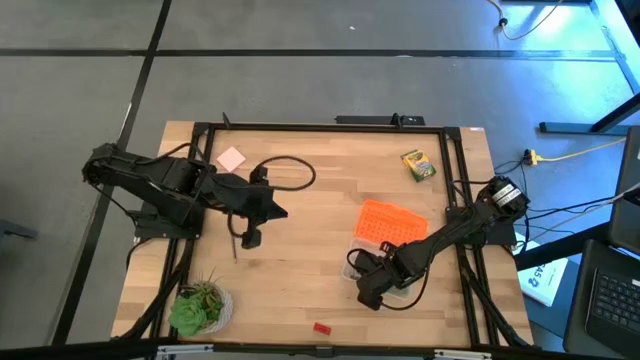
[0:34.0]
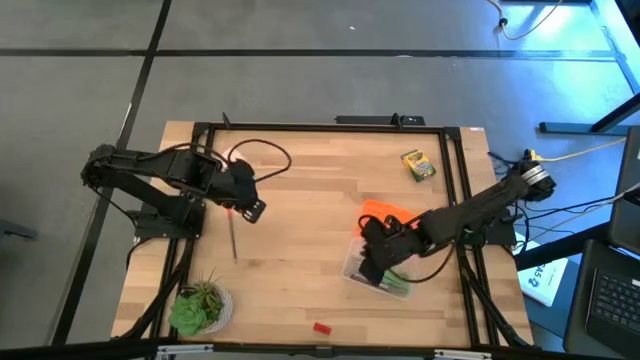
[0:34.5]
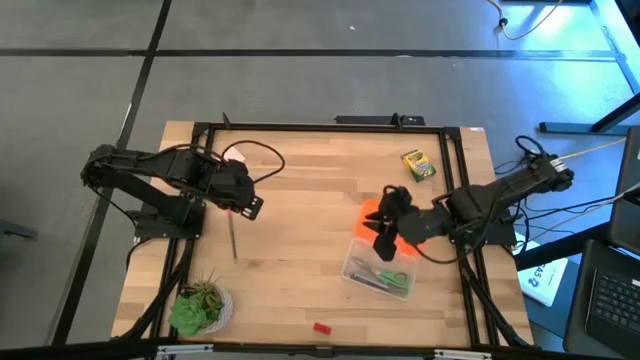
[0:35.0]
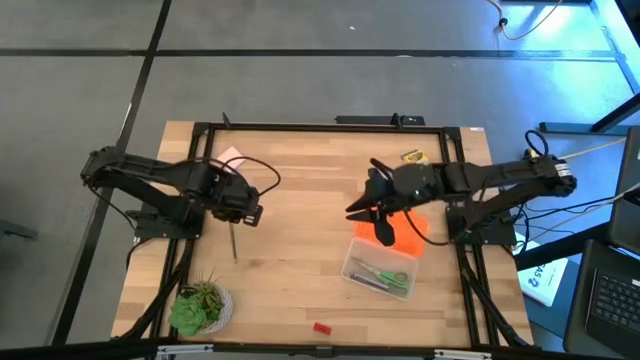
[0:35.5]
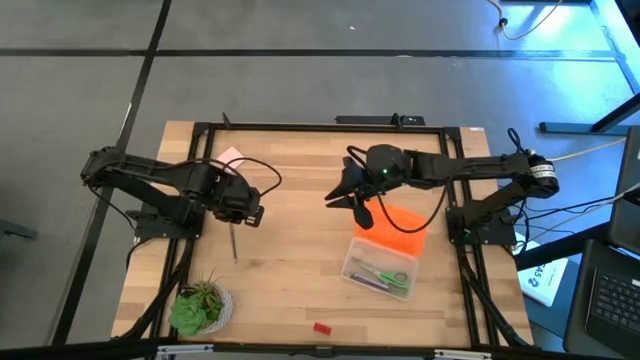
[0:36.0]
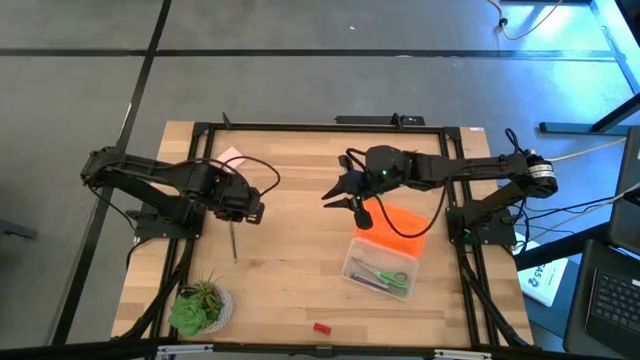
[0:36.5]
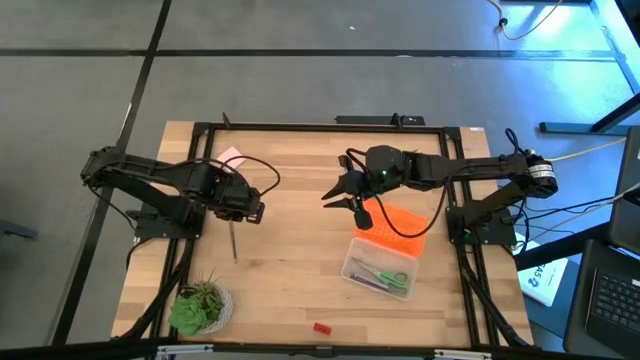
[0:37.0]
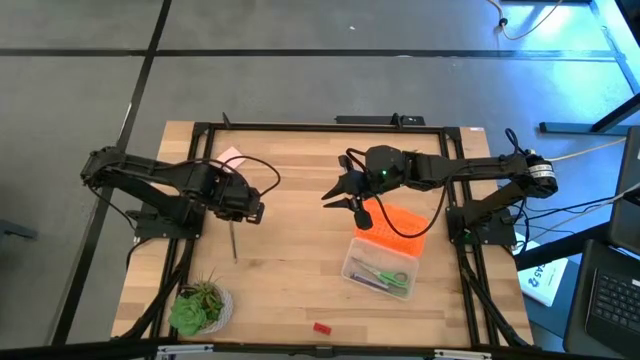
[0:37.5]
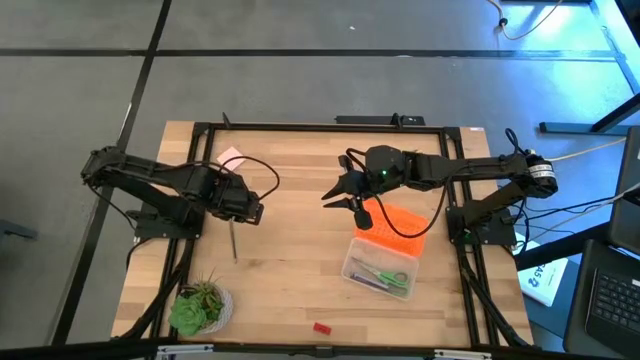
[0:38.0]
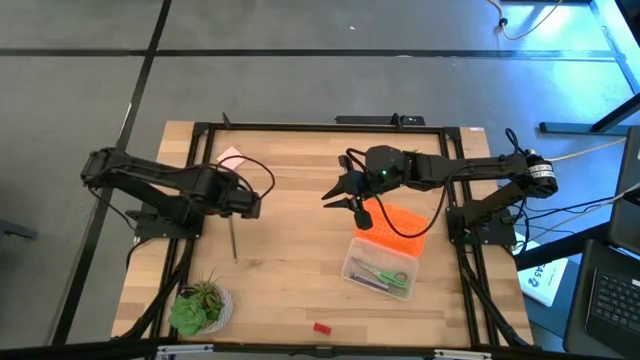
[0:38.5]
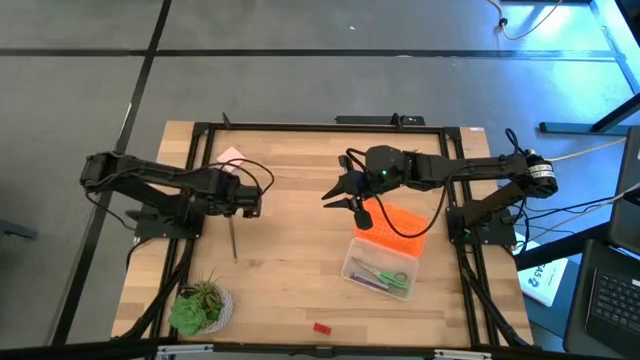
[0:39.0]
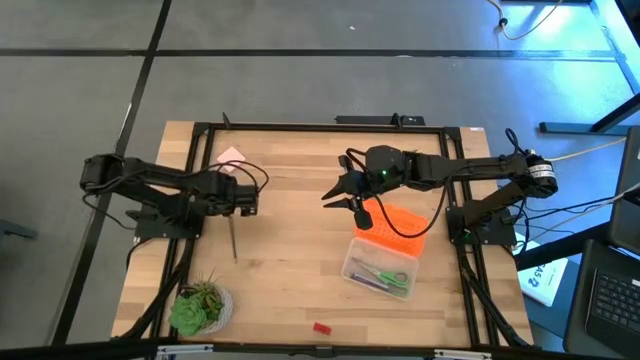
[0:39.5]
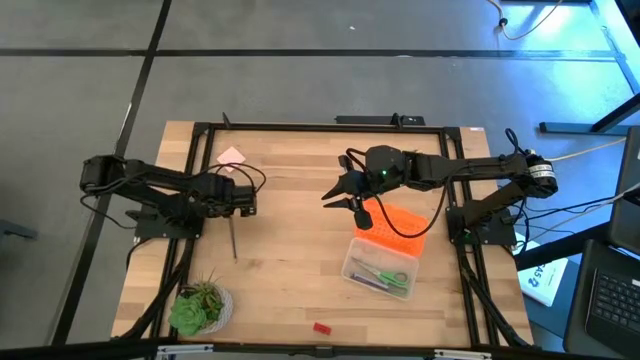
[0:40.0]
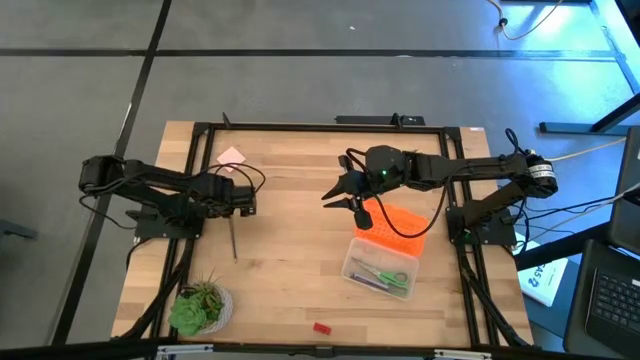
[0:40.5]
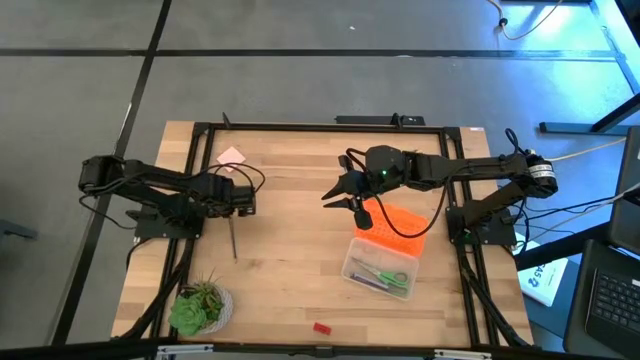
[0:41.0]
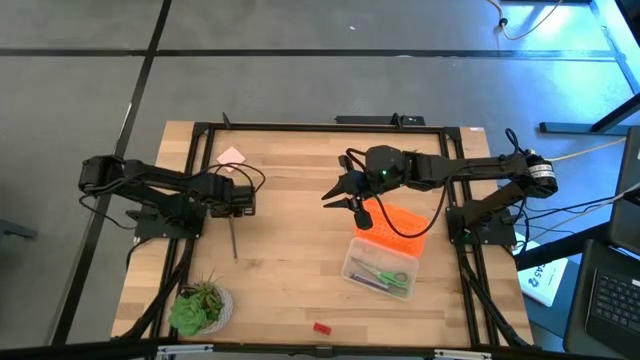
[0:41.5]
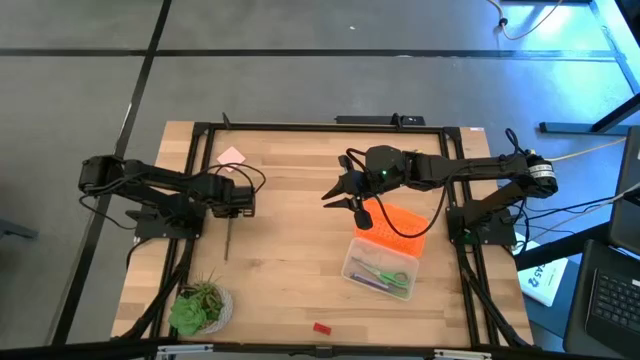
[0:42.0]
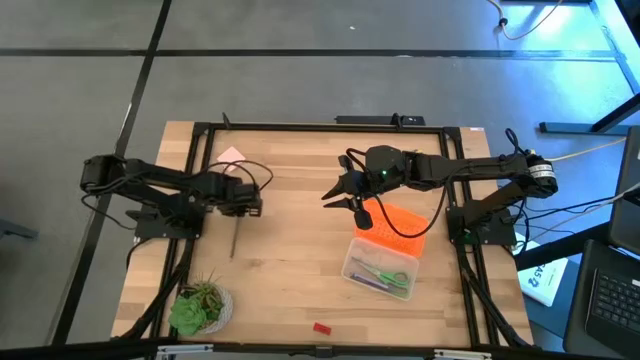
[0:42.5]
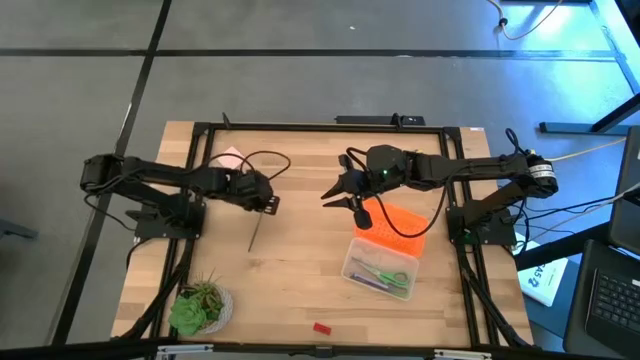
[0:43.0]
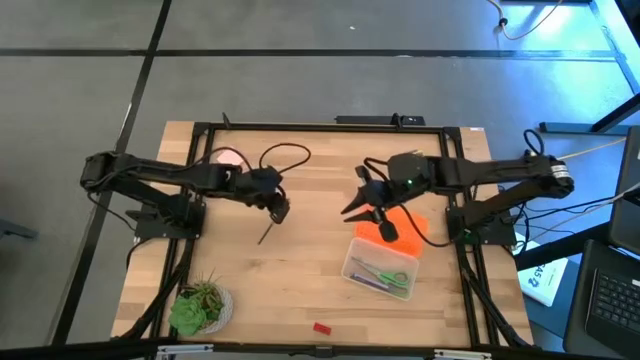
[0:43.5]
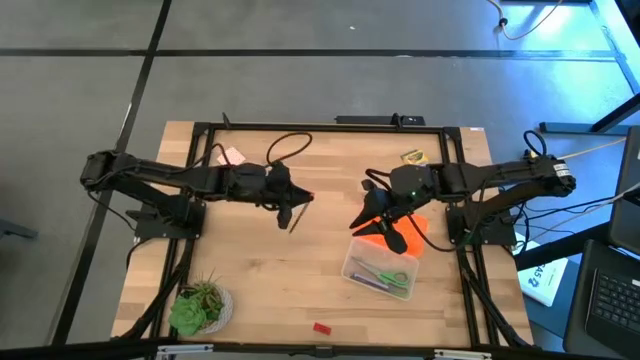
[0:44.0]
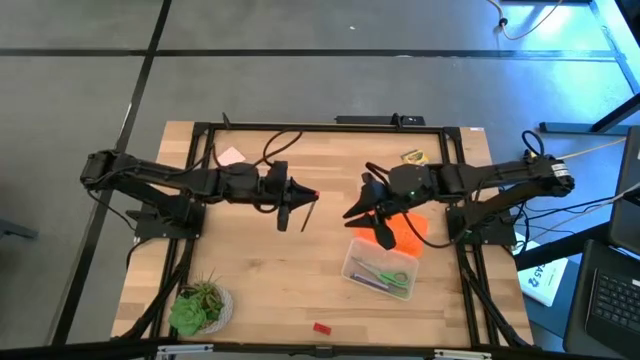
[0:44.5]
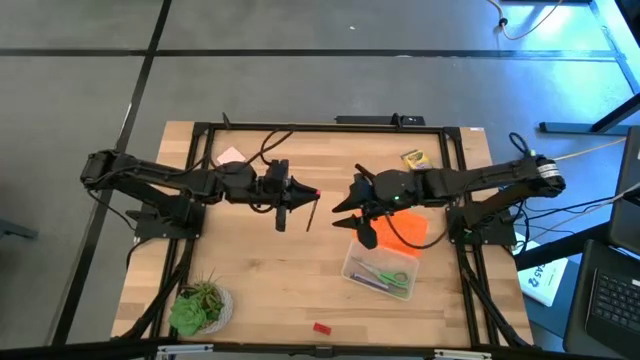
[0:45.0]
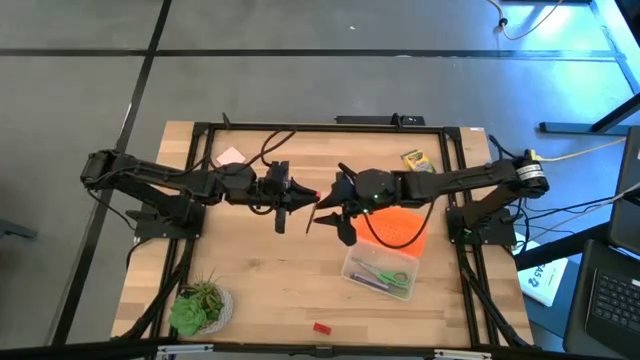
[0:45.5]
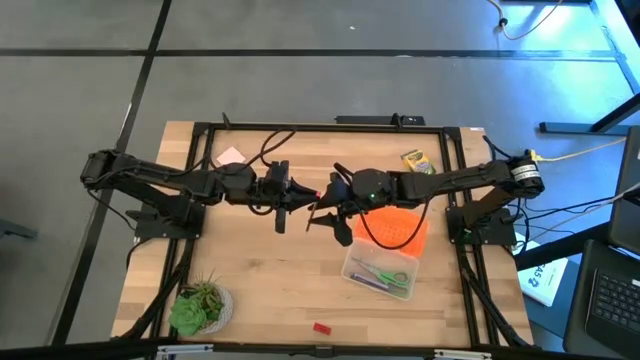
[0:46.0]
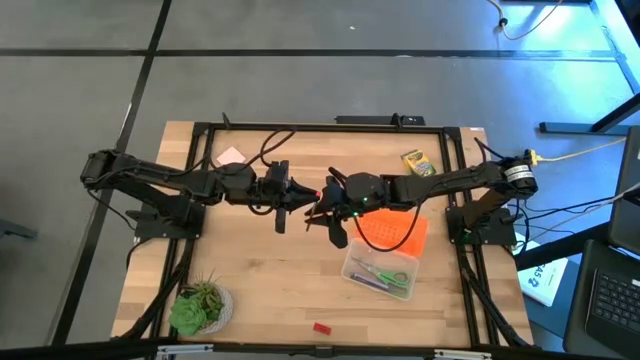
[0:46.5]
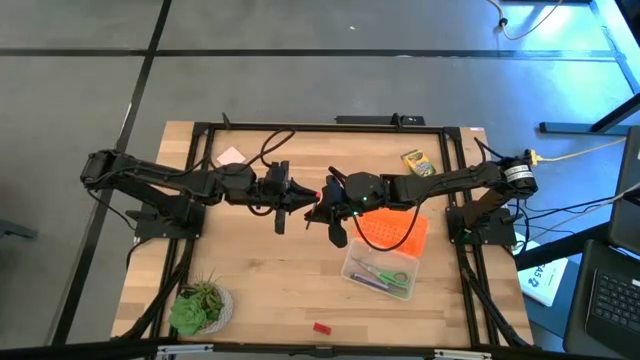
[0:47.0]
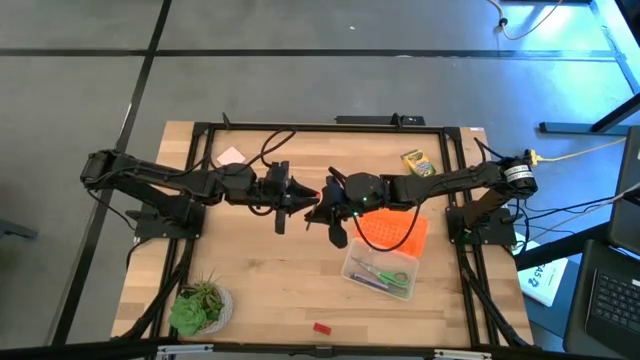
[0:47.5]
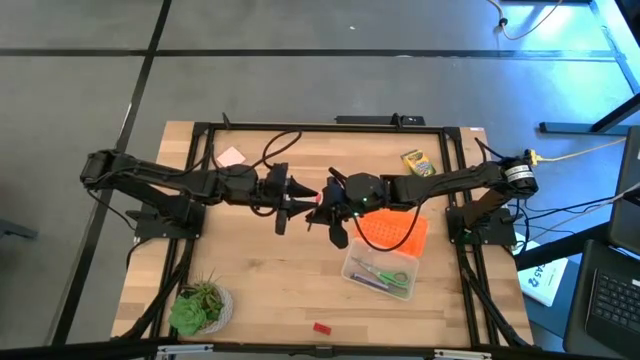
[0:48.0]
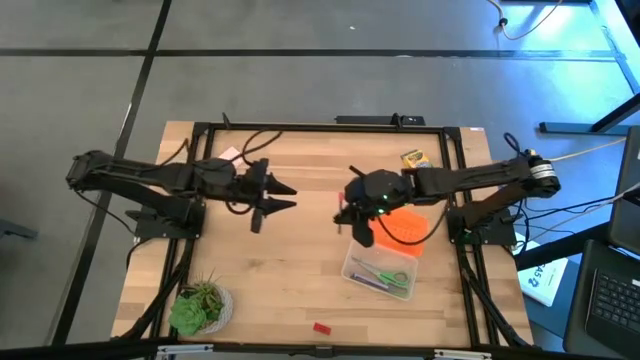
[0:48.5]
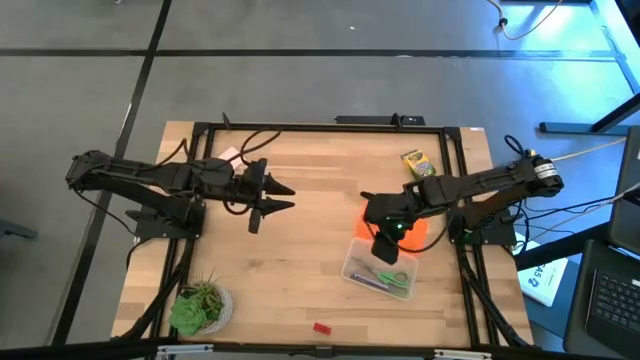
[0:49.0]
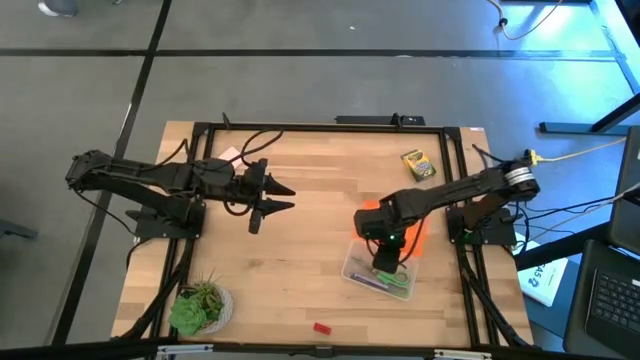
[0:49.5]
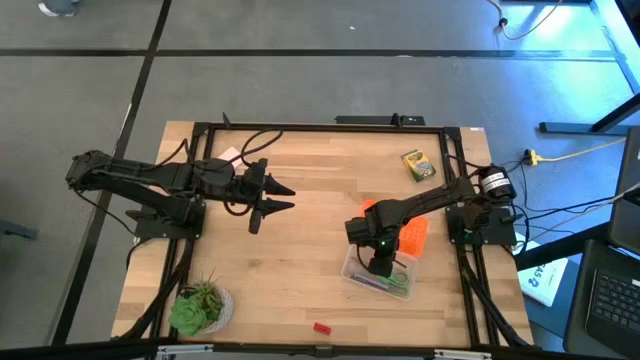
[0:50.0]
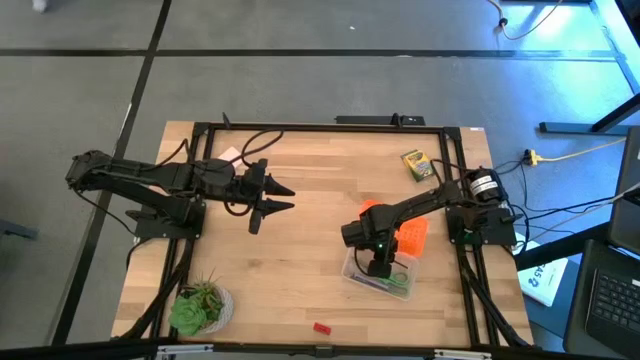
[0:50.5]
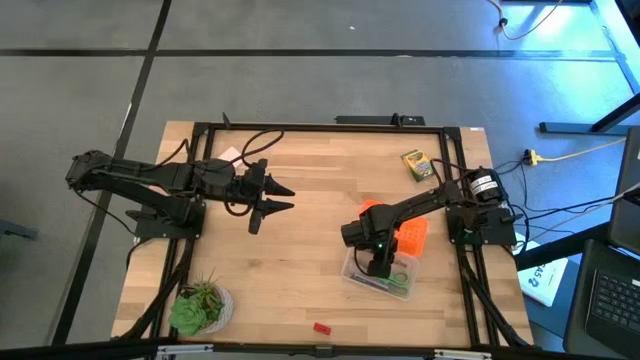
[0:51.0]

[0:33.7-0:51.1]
Task: Pack school essentials
Put the blue pencil into the orange supply box

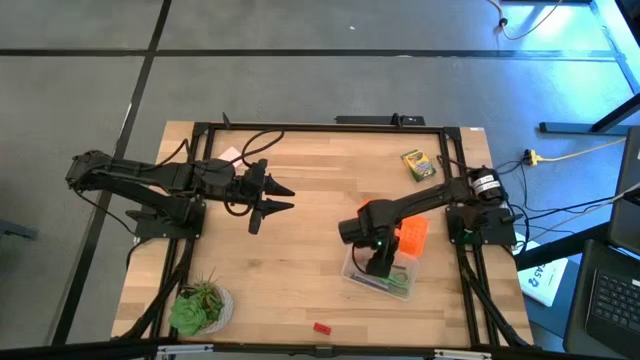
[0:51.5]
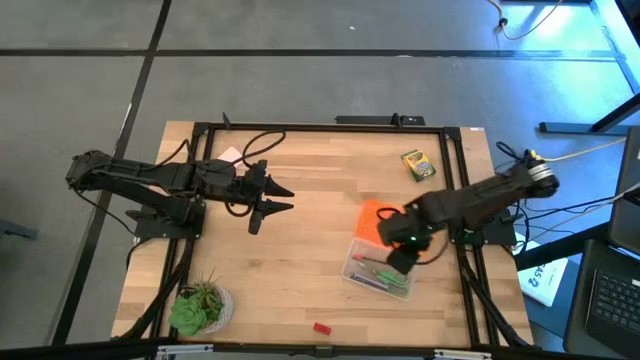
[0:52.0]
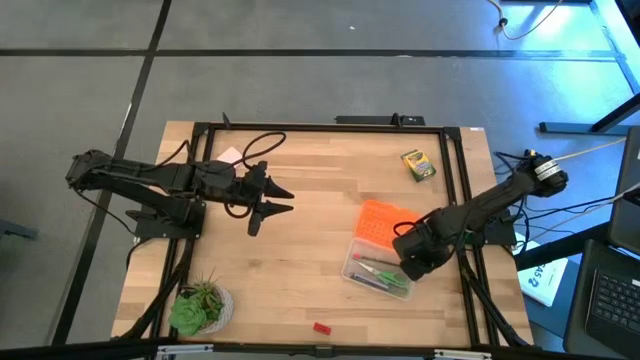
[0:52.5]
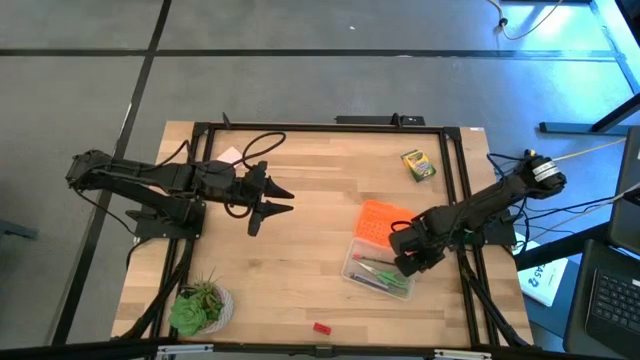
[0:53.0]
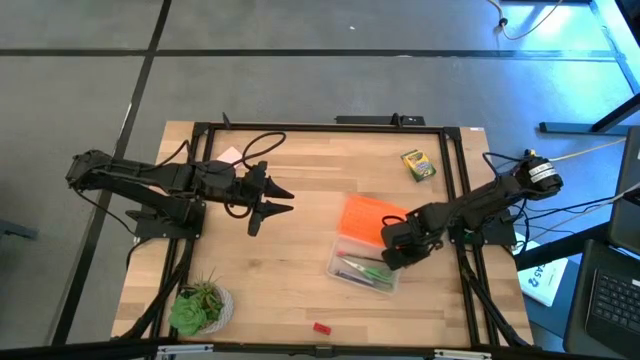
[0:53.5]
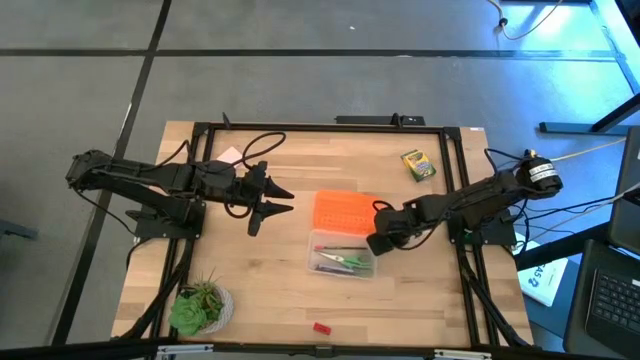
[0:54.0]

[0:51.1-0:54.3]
Move the orange supply box to the center of the table

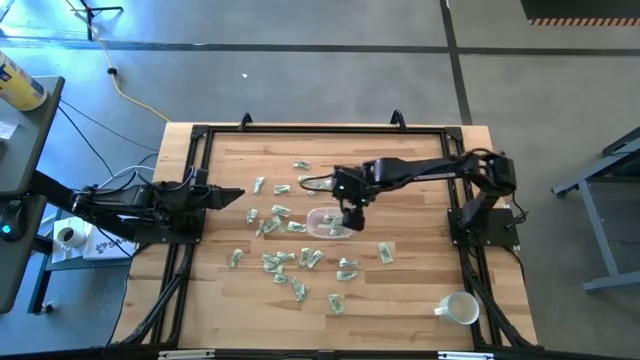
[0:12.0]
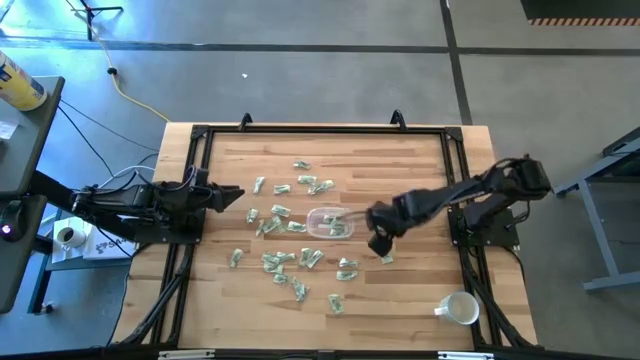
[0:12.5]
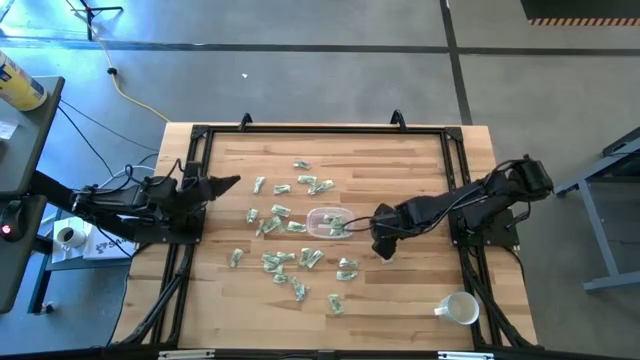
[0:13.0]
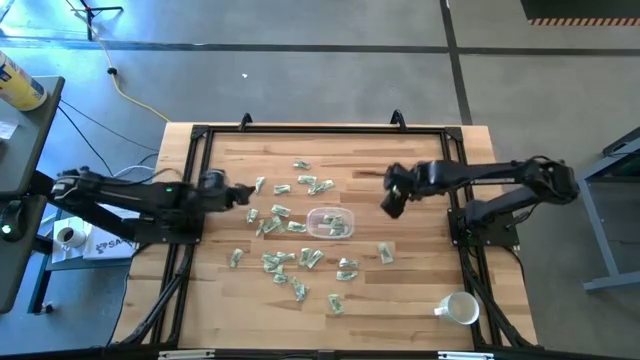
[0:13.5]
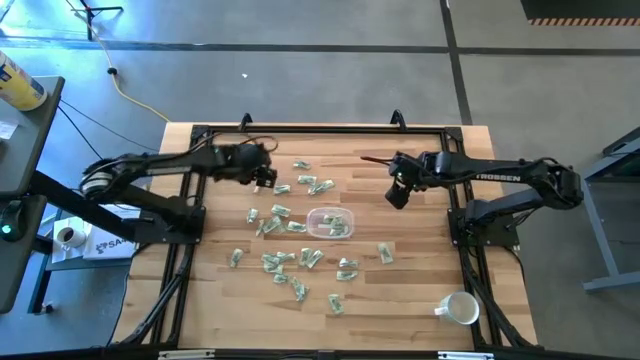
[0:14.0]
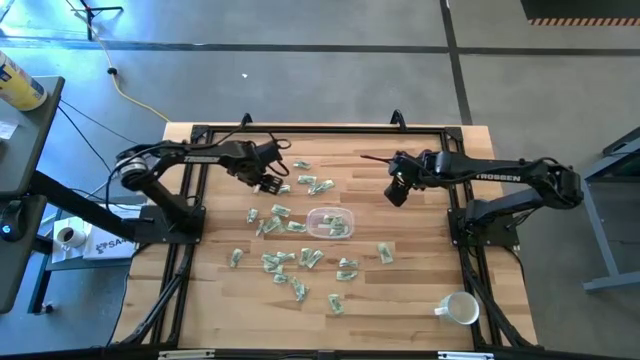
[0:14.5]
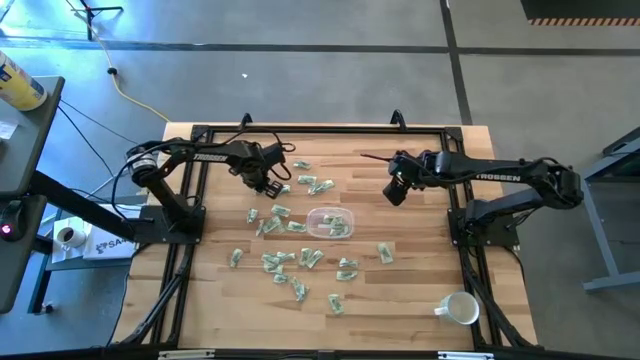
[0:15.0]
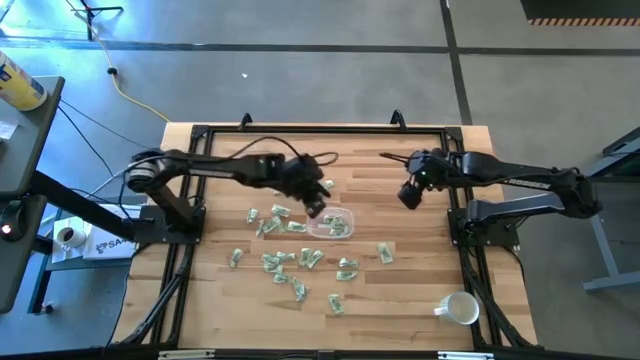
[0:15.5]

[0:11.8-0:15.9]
Task: Pick and place Stevia / Truvia into bins
Put the stevia packet into the transparent container
